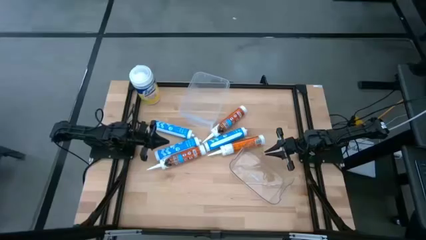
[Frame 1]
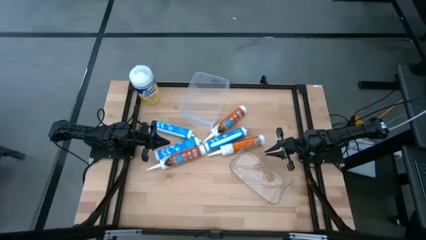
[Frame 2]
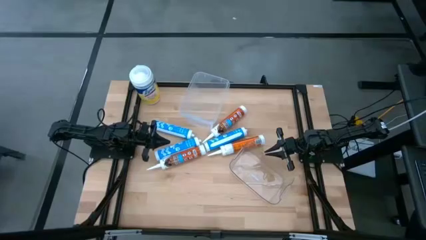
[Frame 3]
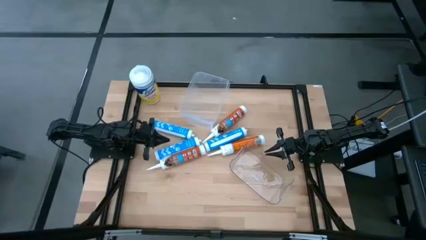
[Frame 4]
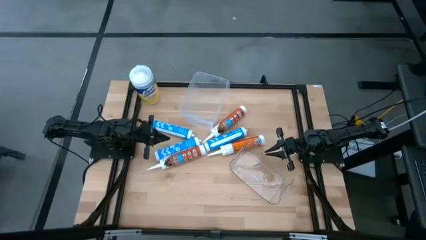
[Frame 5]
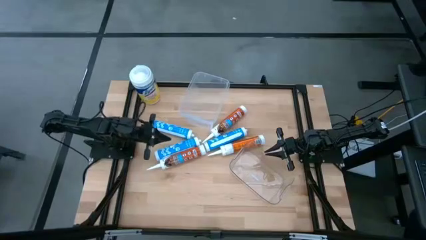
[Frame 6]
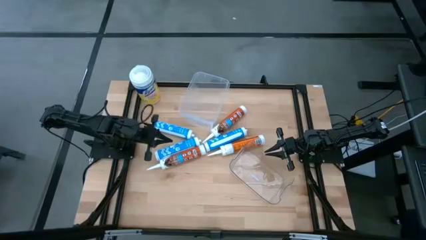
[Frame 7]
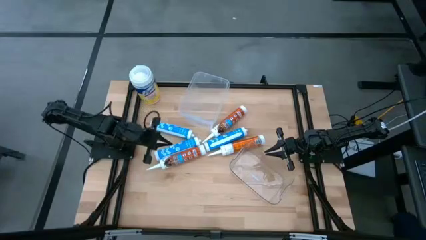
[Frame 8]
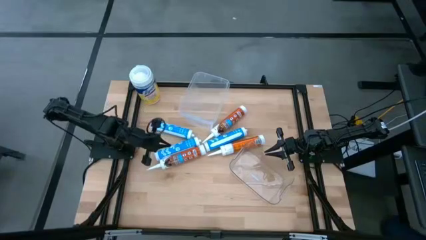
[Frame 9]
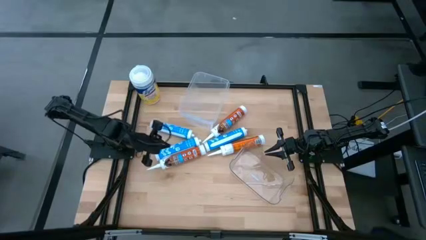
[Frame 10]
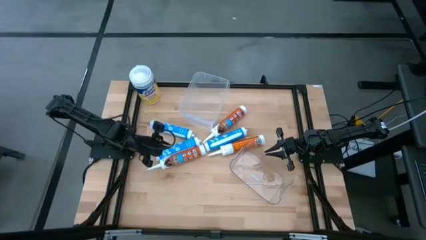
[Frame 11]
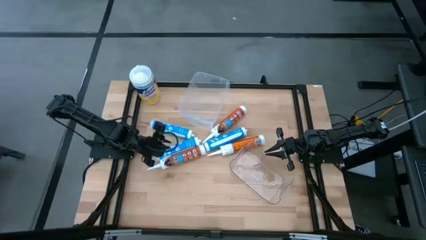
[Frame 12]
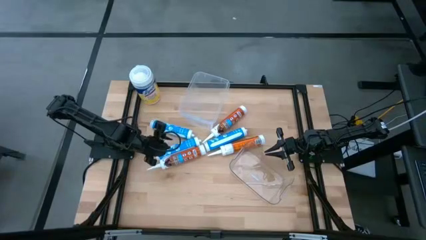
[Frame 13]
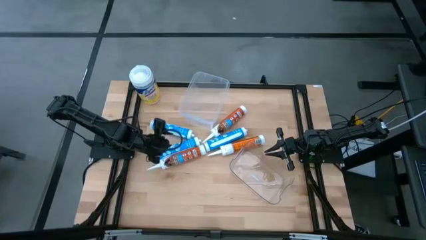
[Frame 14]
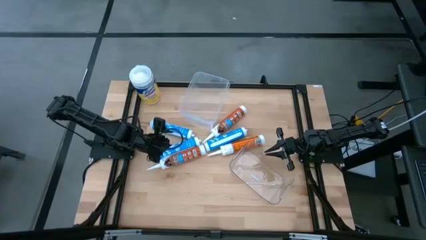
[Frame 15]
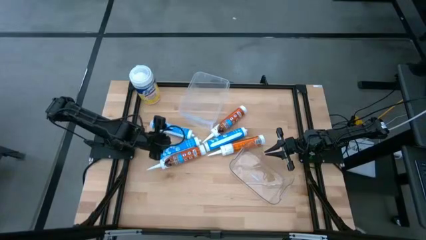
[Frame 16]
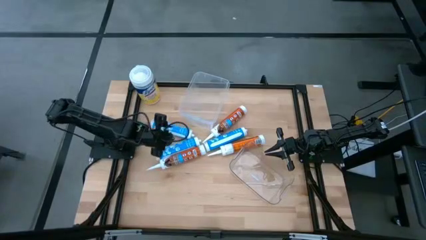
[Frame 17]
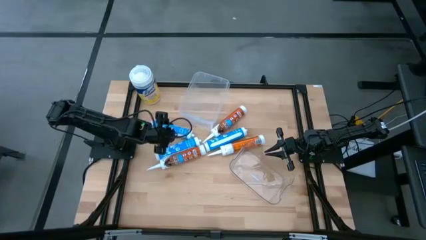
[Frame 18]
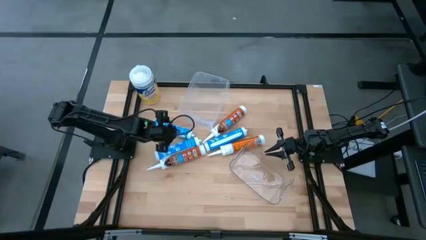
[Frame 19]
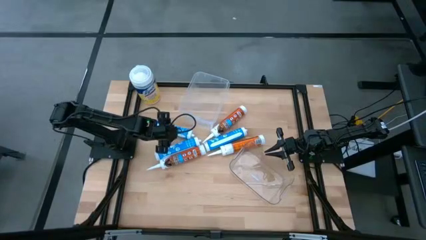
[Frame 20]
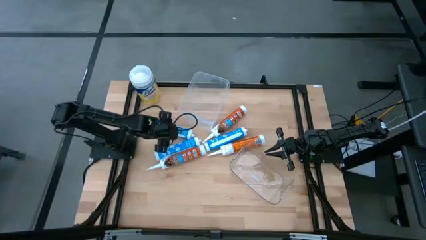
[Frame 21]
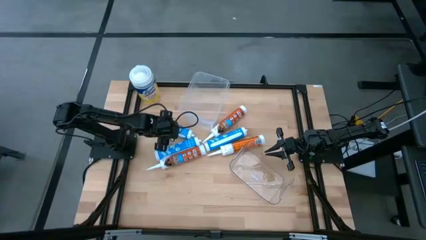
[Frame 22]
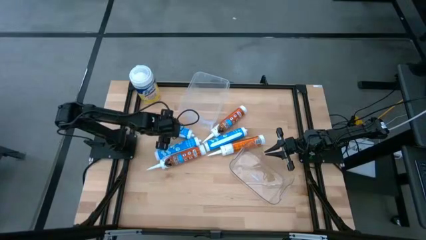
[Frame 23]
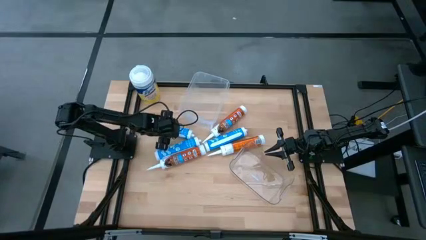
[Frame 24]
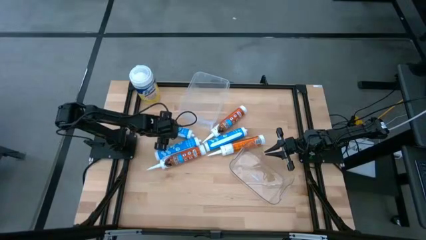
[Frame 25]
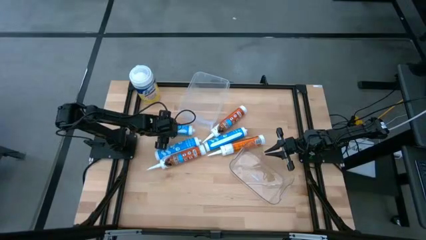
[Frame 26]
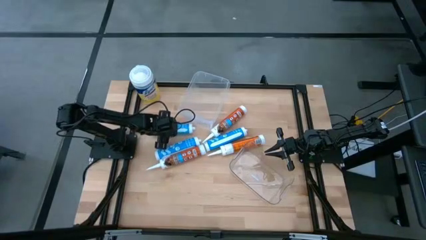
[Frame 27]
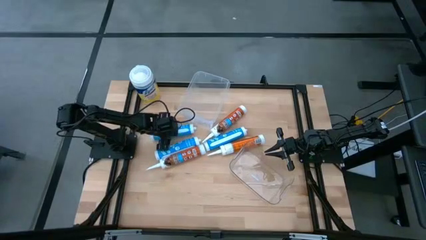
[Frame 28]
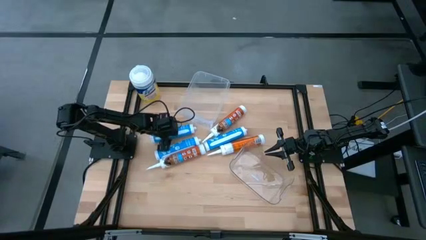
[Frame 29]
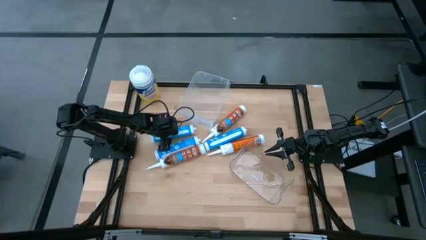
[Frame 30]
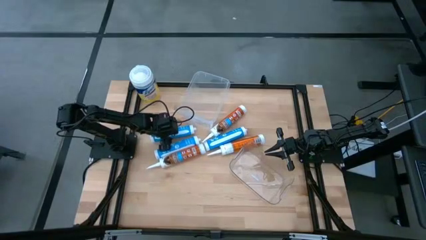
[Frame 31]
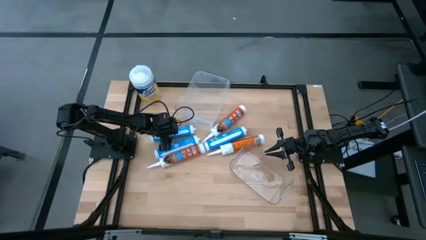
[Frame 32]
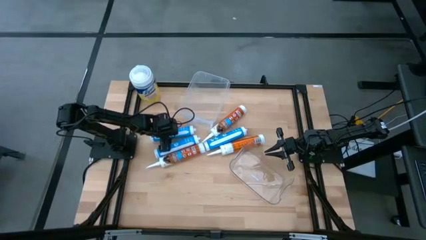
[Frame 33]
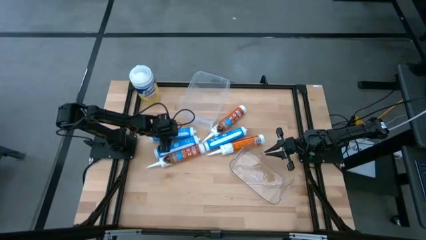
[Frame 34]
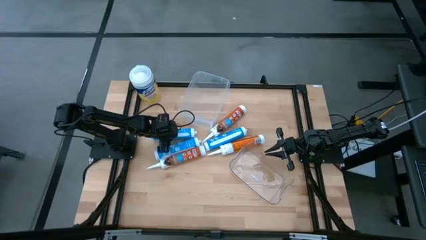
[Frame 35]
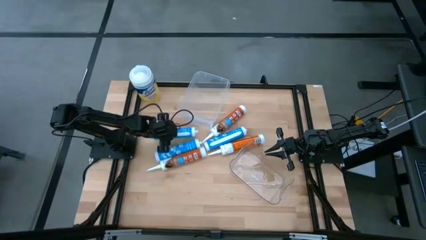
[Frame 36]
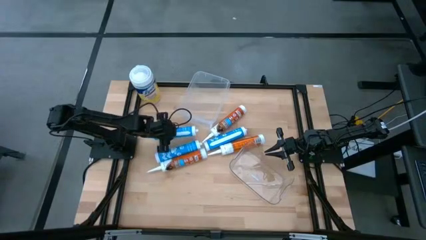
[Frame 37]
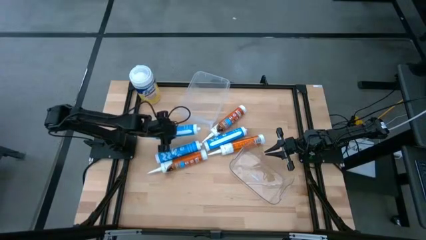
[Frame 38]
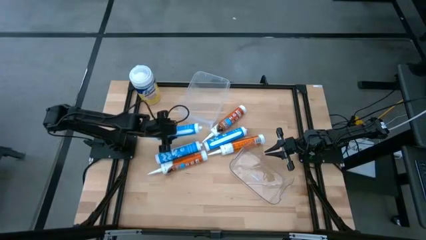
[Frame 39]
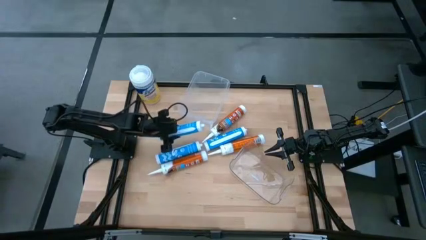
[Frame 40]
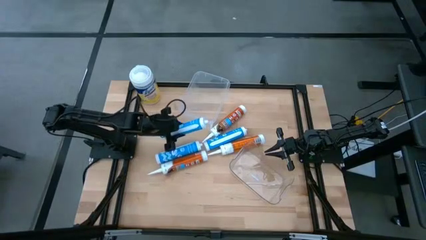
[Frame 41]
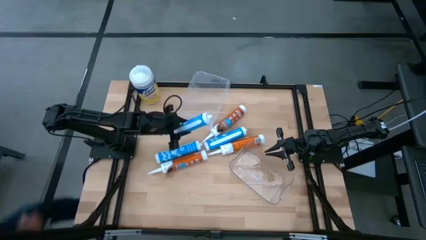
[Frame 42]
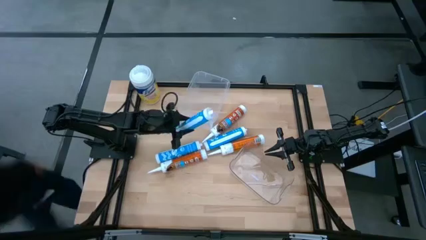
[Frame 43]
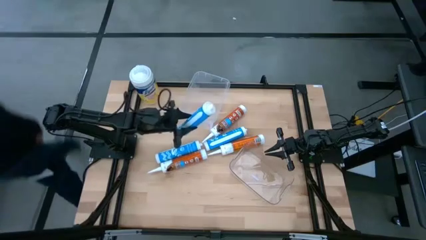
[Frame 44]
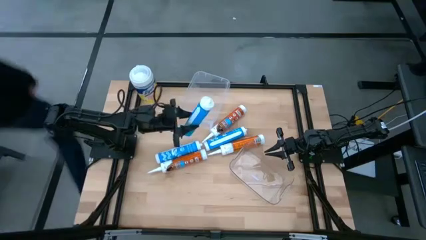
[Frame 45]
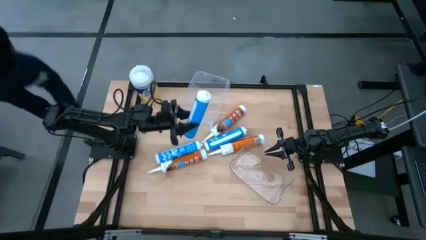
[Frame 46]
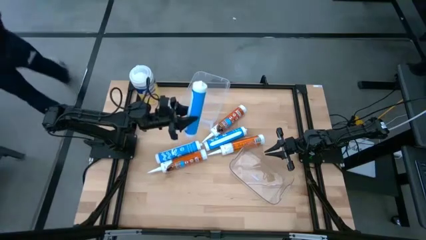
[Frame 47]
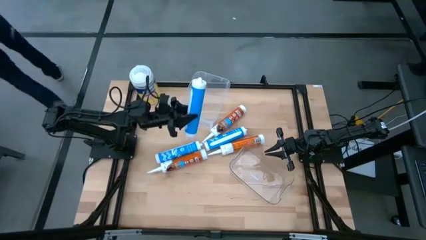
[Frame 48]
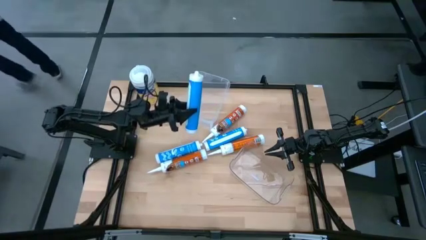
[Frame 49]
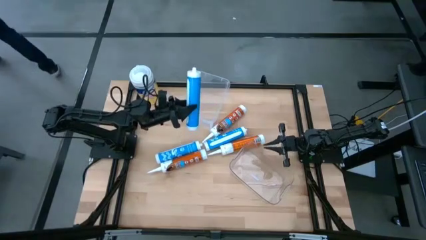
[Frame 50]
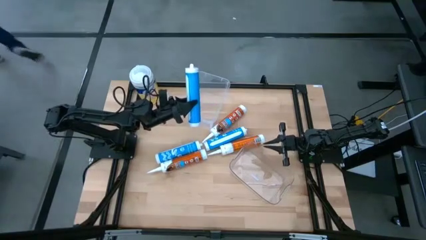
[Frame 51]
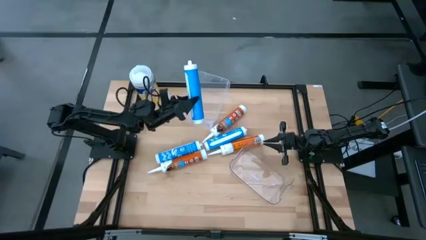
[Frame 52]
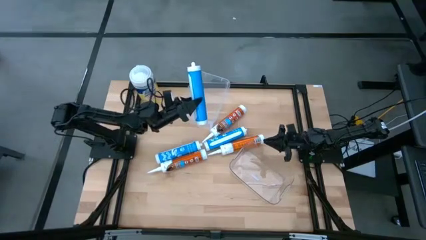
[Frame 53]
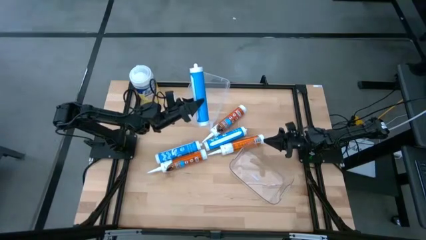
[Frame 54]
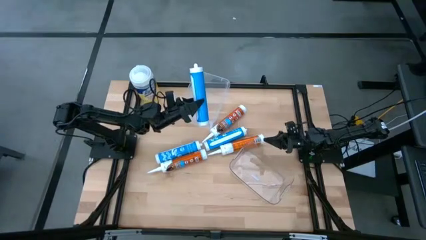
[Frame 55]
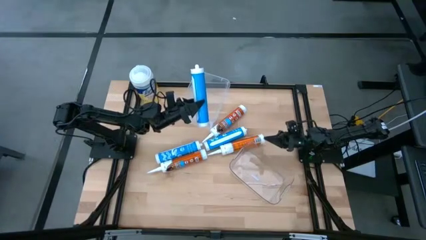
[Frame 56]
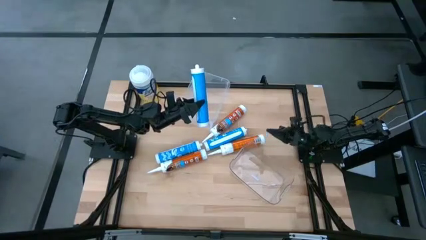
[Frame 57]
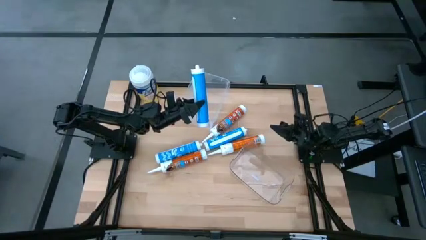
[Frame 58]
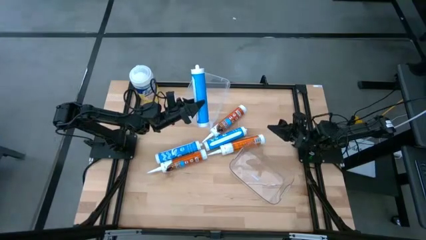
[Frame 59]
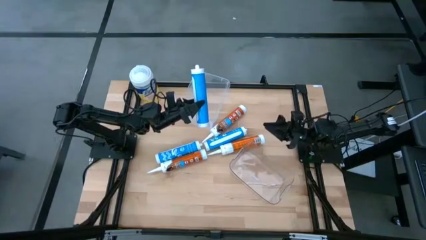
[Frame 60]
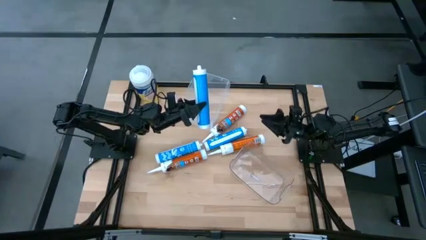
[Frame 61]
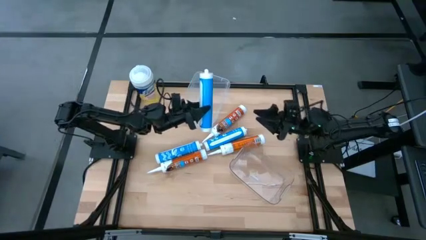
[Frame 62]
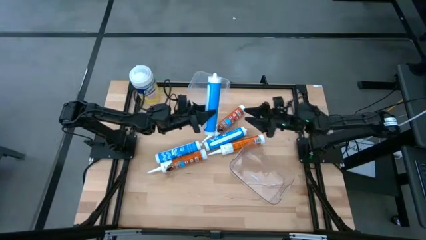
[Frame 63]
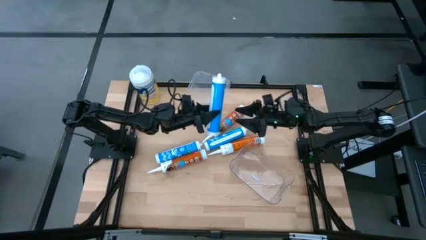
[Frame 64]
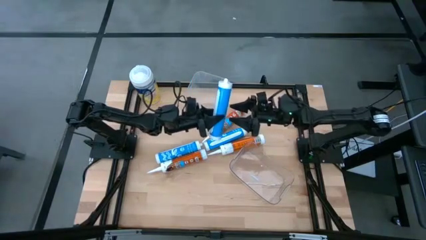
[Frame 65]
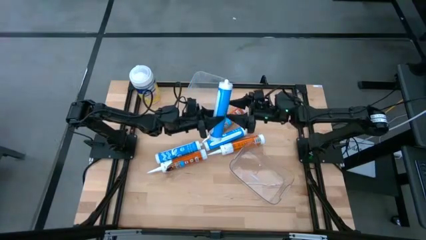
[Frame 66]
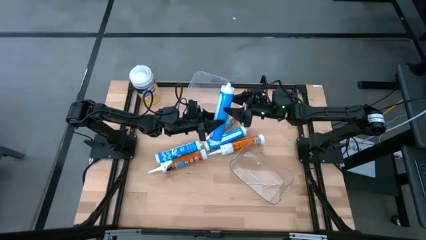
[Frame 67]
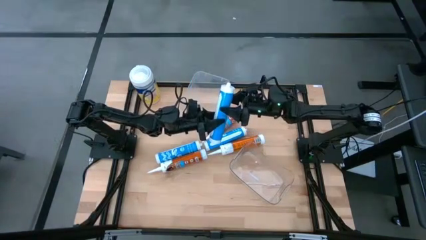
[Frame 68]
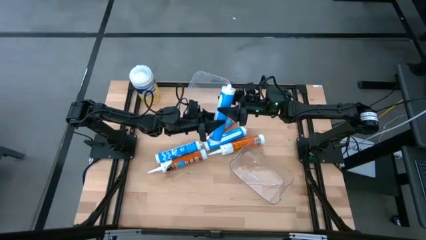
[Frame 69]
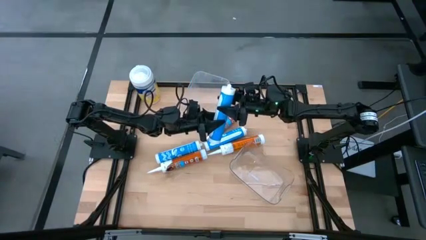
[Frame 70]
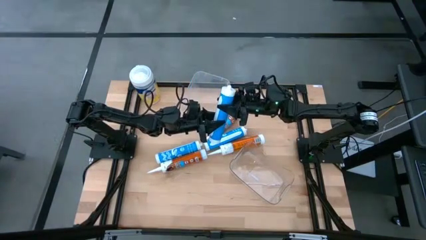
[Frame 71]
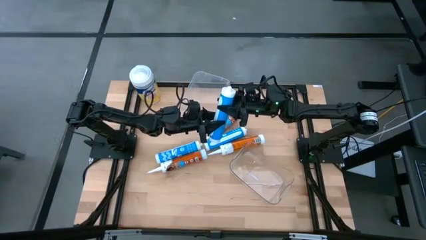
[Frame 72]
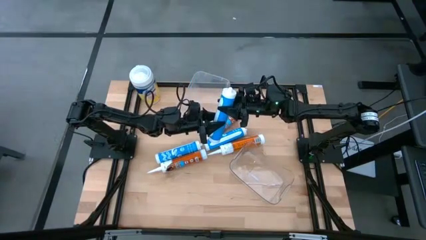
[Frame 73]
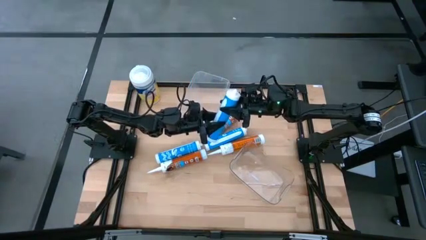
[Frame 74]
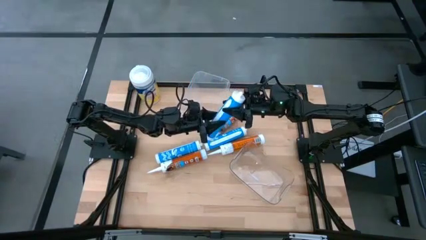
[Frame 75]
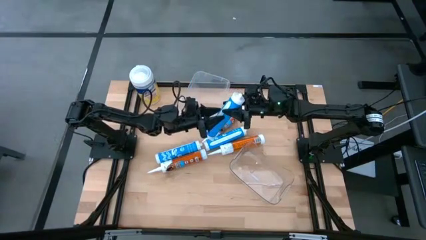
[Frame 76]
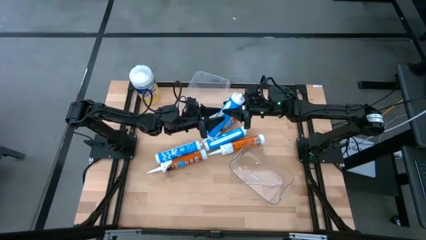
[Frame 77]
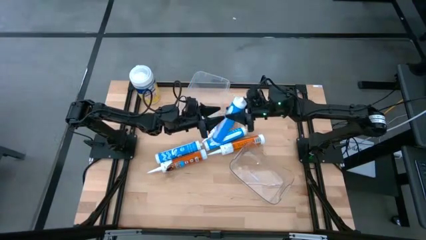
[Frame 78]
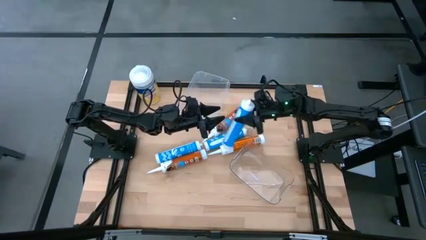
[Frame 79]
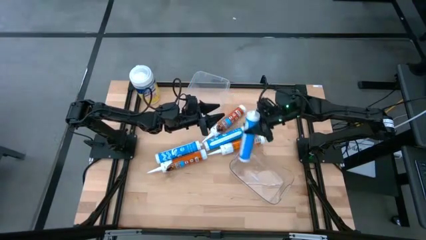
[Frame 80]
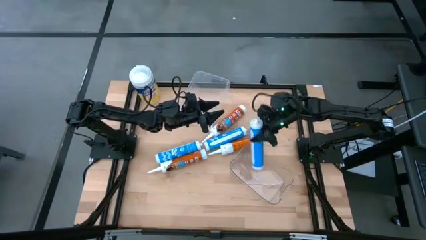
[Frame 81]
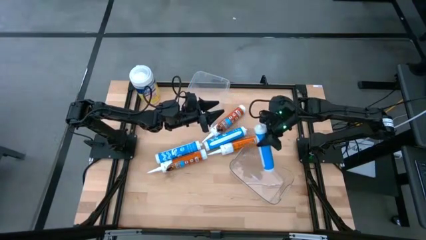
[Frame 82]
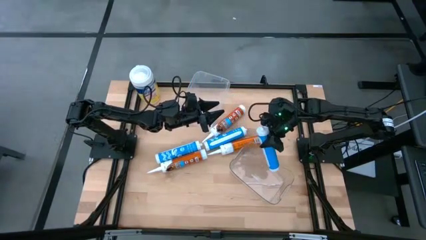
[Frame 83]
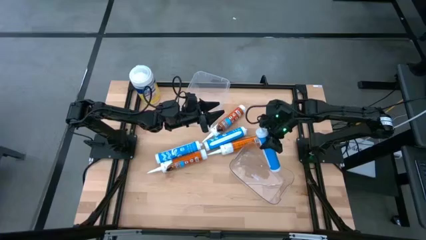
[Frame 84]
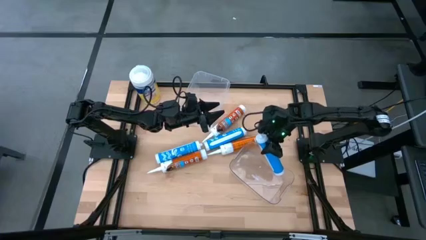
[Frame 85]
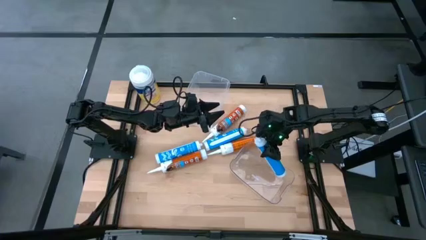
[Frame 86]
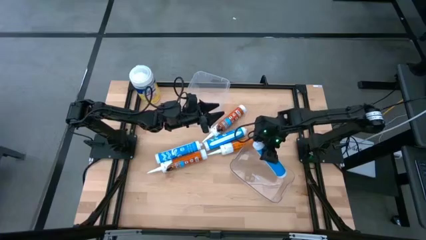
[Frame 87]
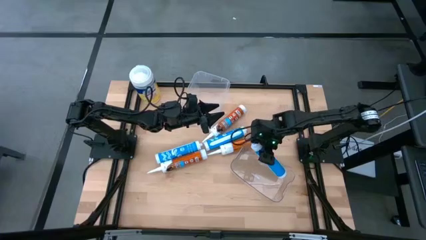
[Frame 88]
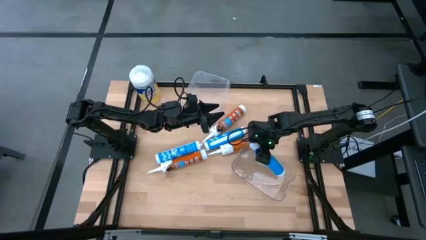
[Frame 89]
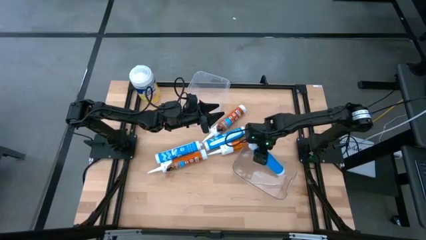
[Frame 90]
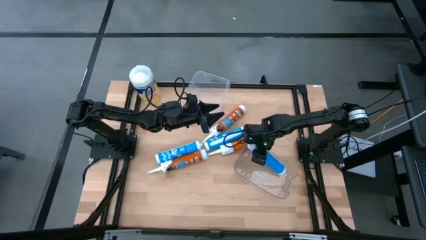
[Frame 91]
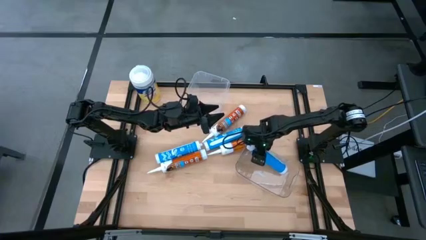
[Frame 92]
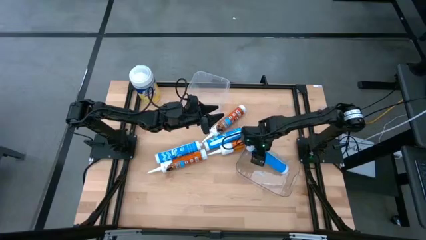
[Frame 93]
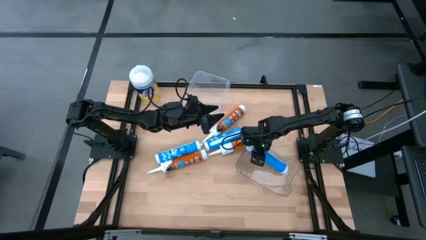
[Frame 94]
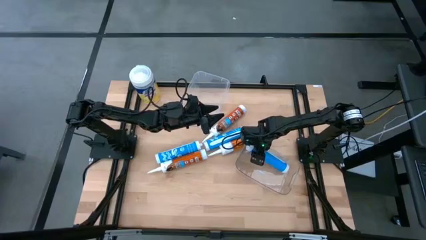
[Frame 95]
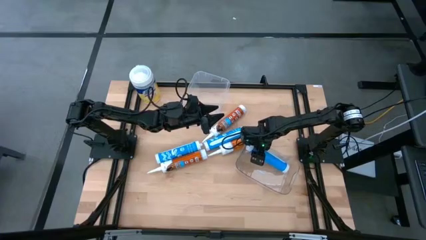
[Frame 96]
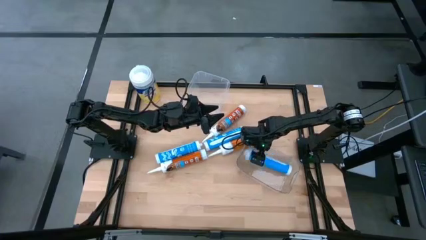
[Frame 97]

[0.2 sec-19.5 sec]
Task: Pick & place silicon tubes, Sealant and Lysol wipes
Put the top blue sealant into the transparent bin
